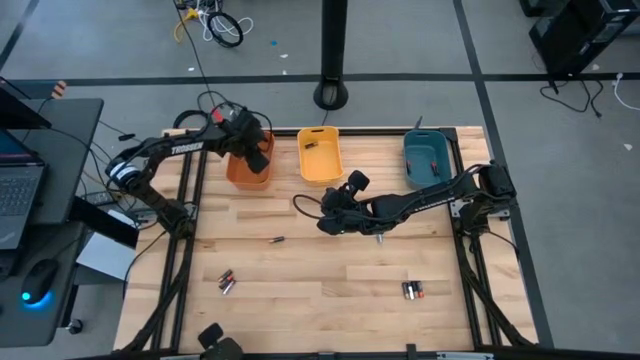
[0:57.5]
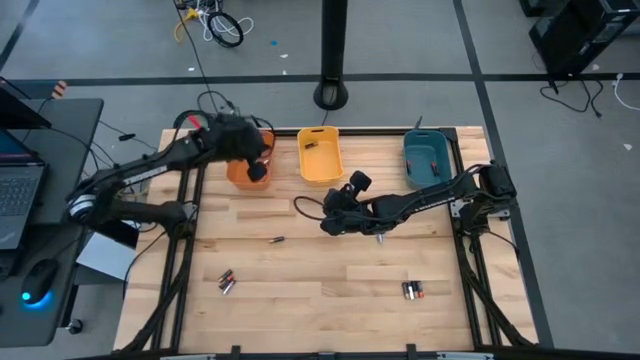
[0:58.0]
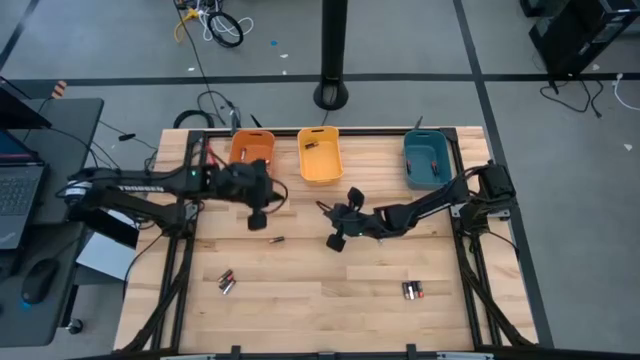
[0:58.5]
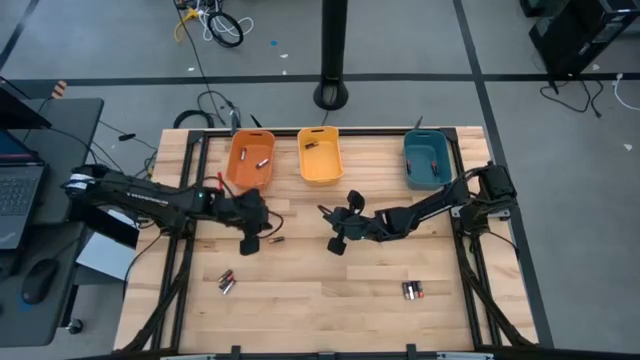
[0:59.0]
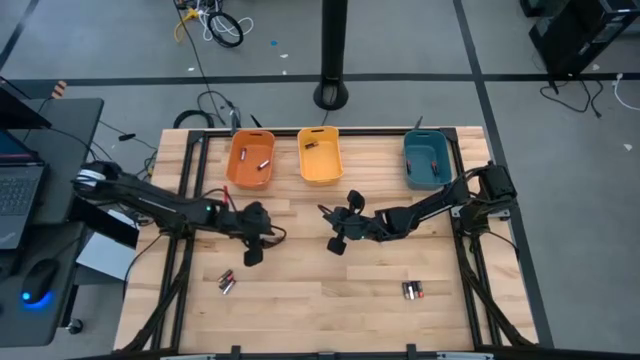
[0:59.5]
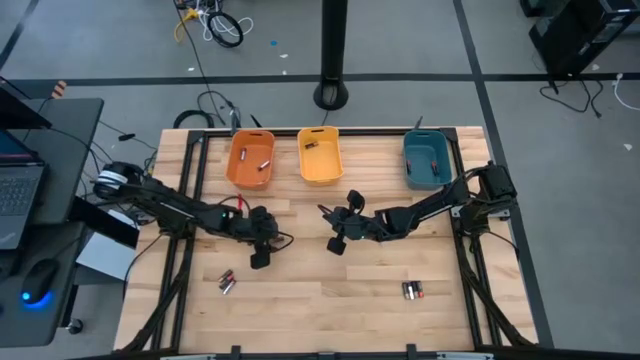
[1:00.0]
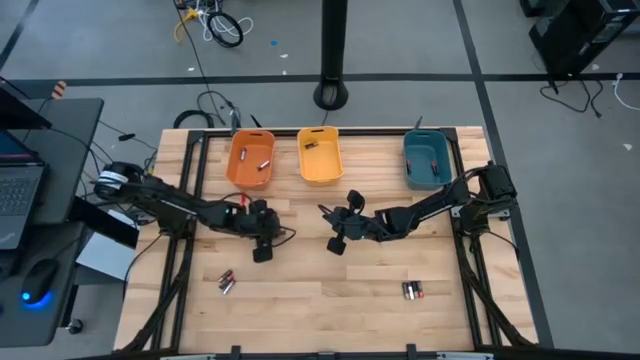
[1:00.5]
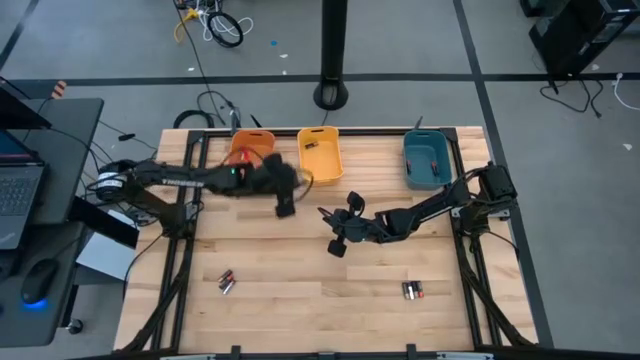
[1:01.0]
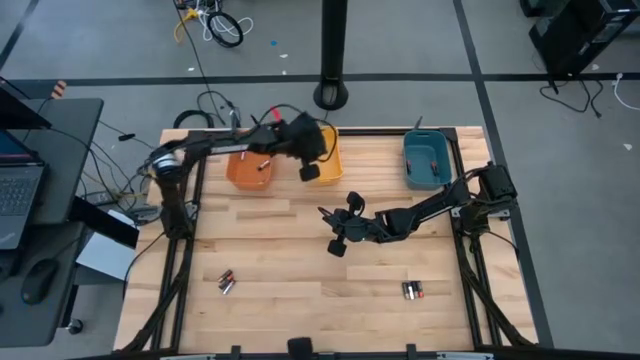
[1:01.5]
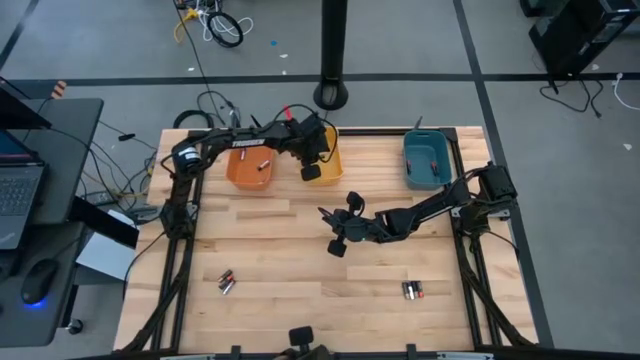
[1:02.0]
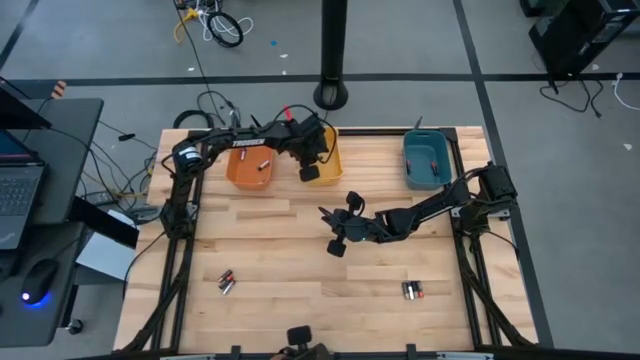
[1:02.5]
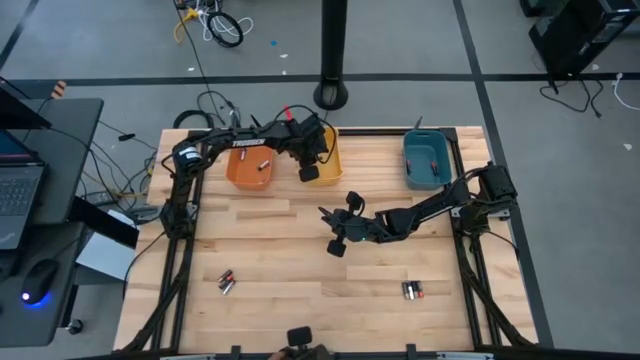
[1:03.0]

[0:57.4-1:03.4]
Task: Sort batteries
Put the black battery into the yellow bin

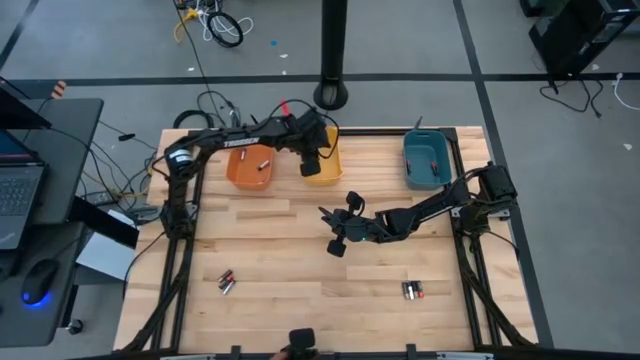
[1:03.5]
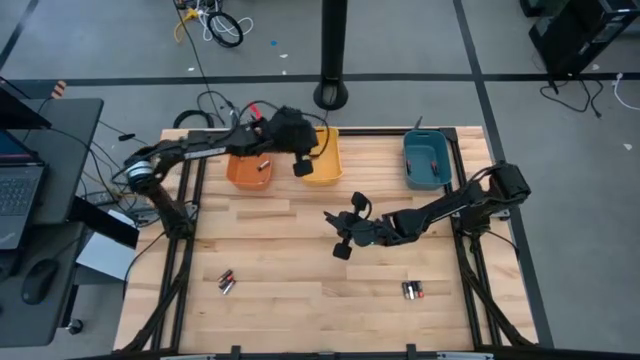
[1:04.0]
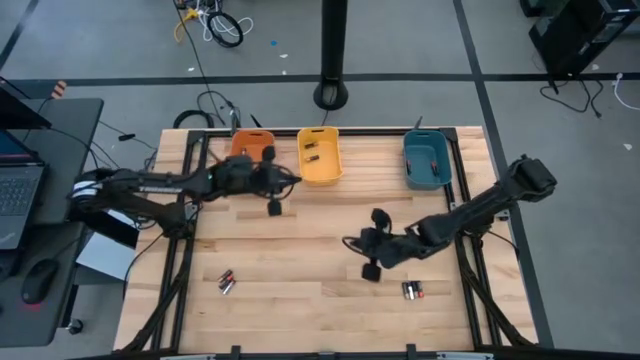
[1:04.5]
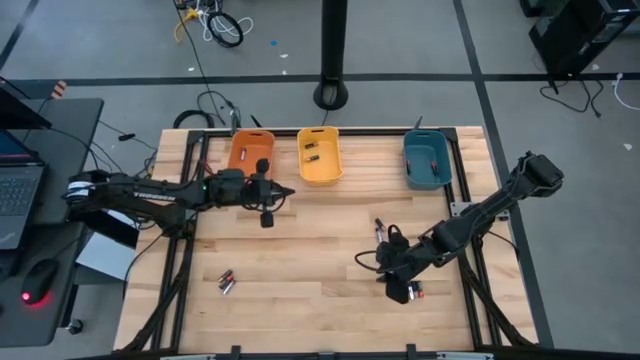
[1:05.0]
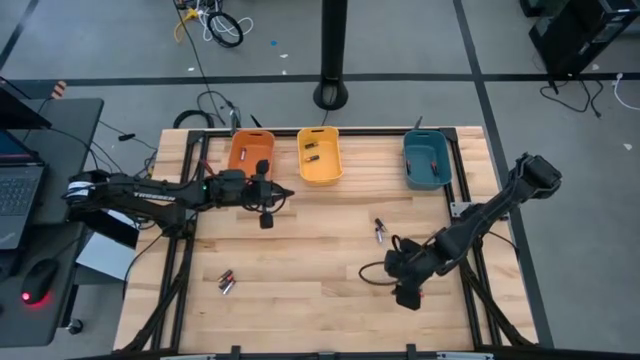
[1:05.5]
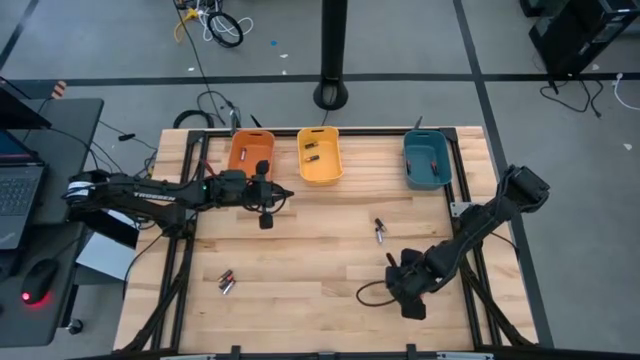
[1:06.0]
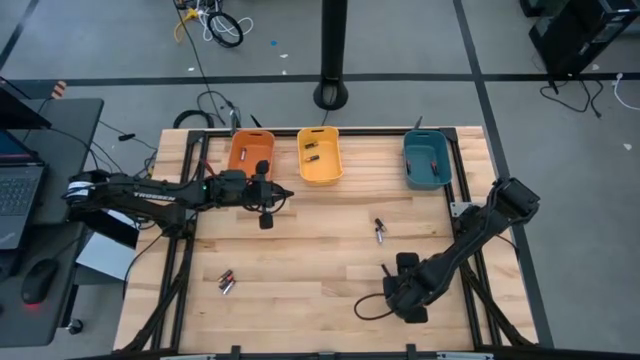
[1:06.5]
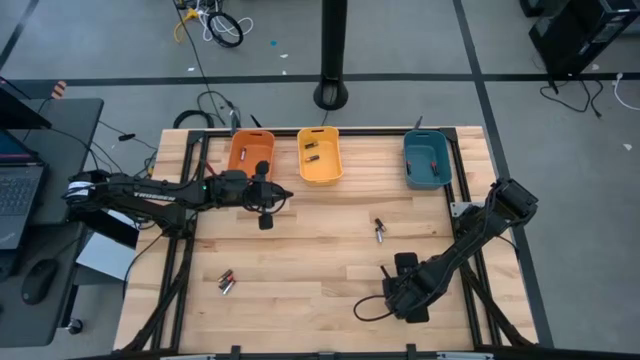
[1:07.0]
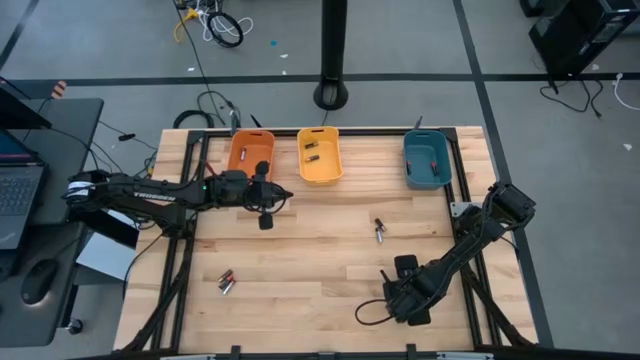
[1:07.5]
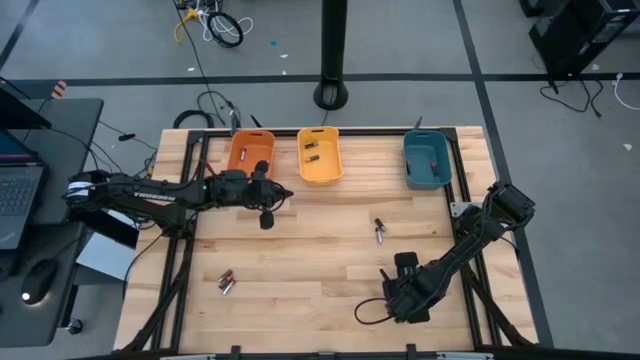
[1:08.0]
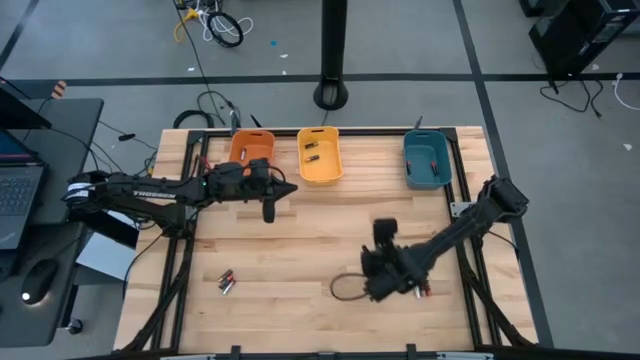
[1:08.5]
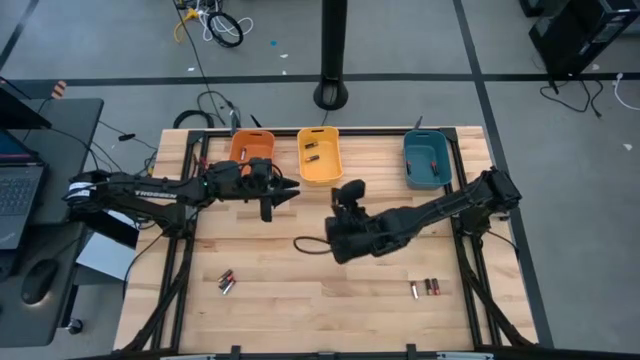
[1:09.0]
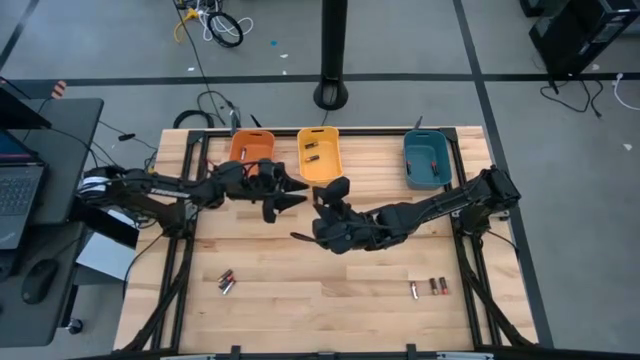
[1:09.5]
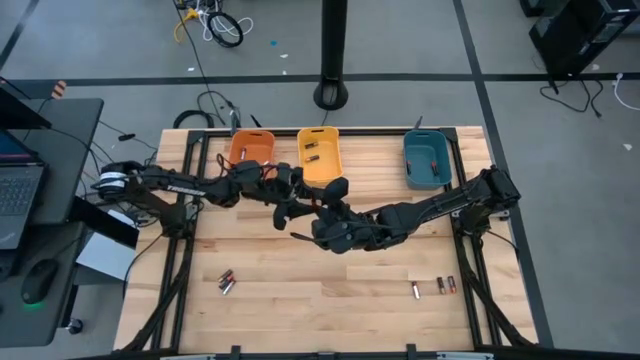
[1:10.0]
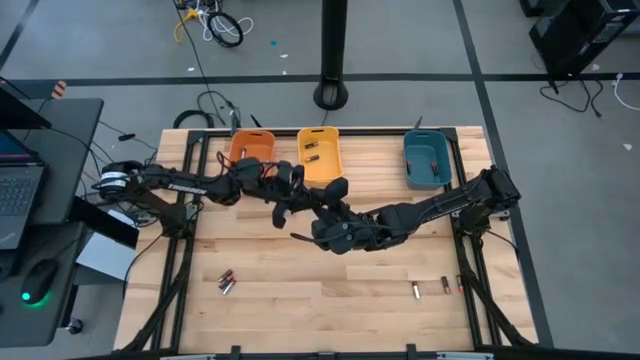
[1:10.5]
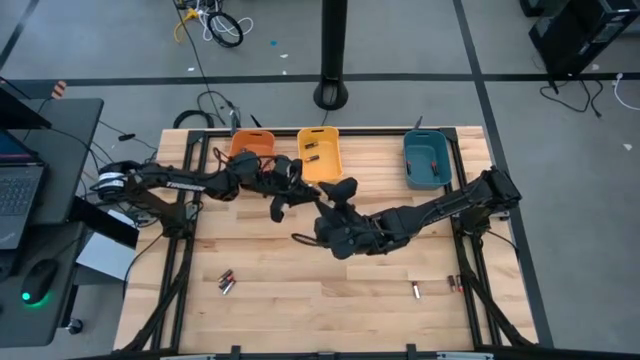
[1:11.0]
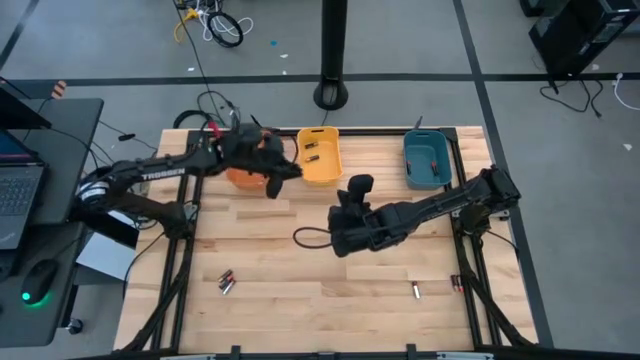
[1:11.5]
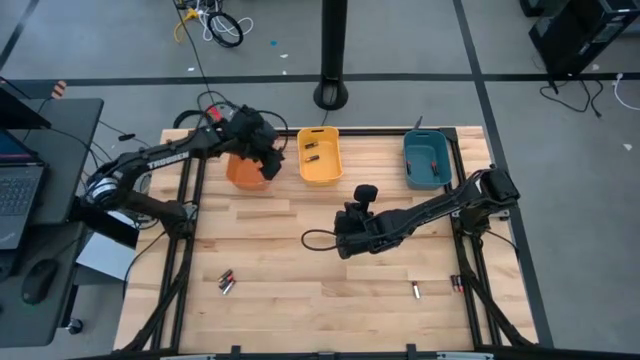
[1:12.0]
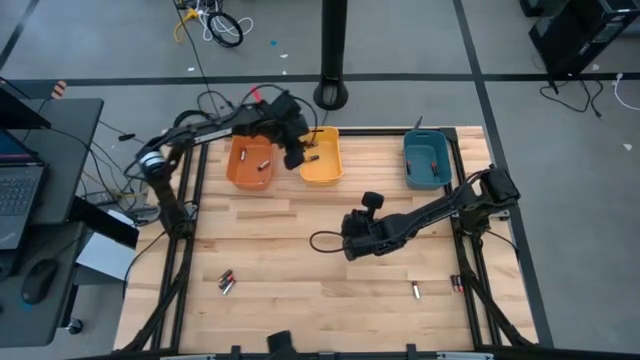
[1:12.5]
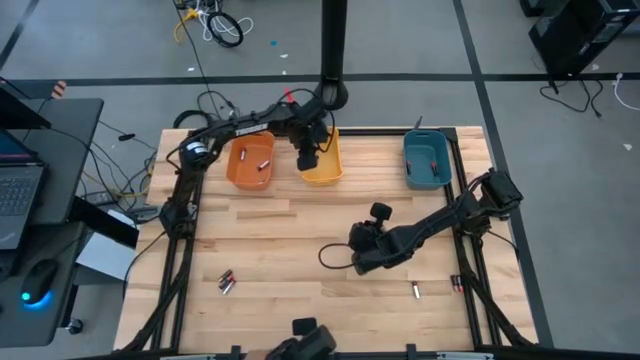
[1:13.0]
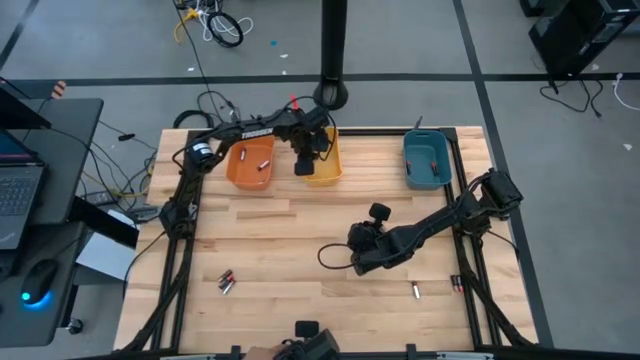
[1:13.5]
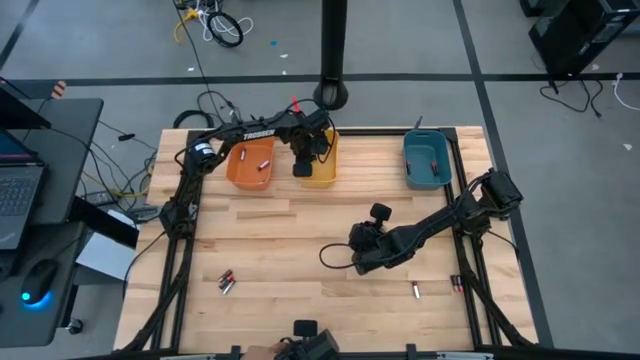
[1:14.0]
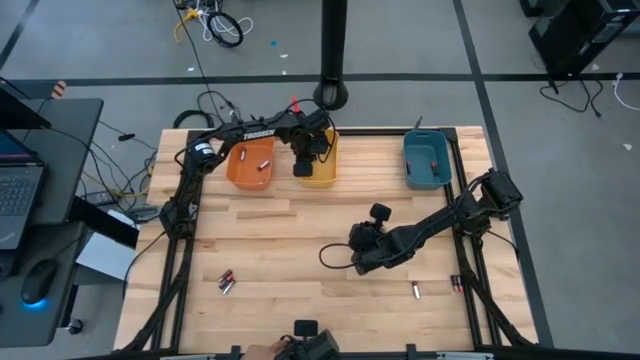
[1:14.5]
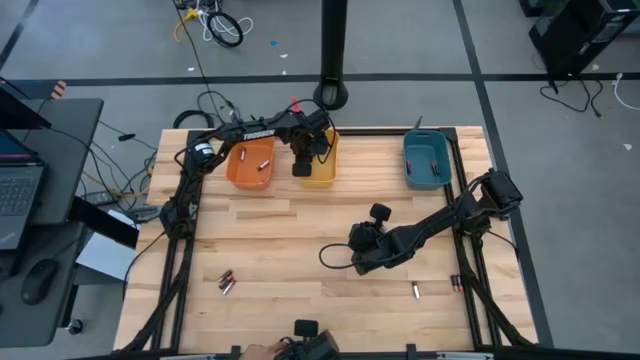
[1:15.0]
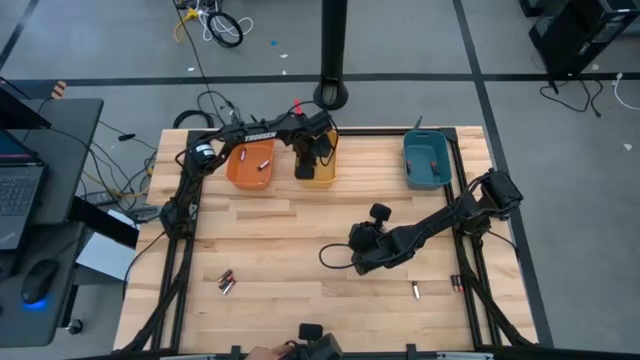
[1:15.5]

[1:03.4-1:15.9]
Put the black battery into the yellow bin

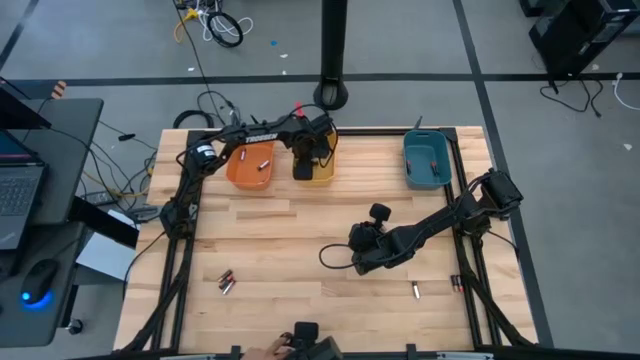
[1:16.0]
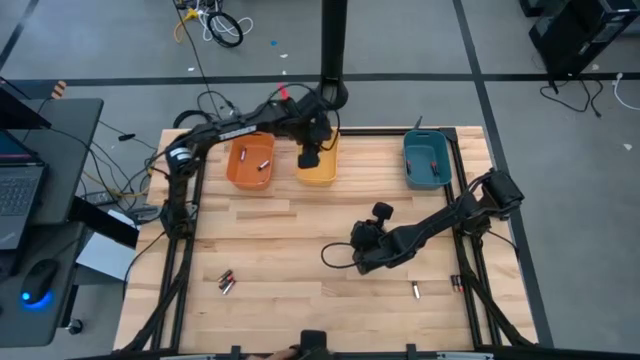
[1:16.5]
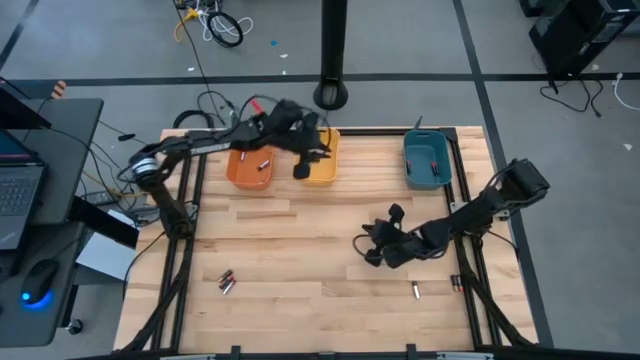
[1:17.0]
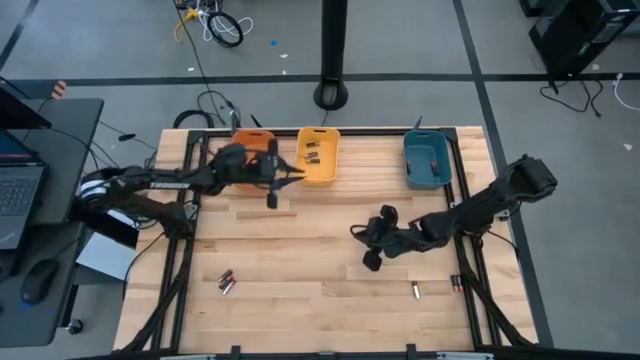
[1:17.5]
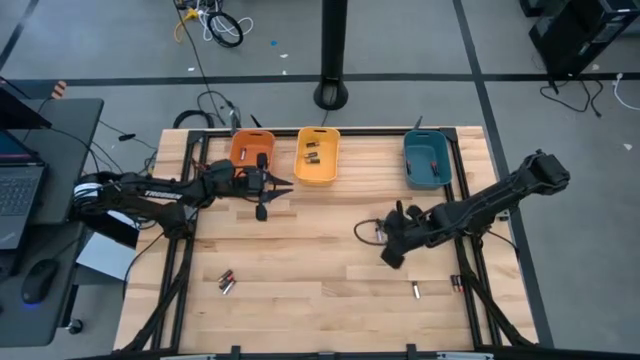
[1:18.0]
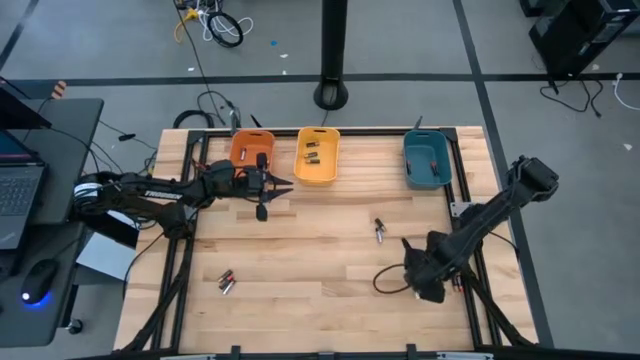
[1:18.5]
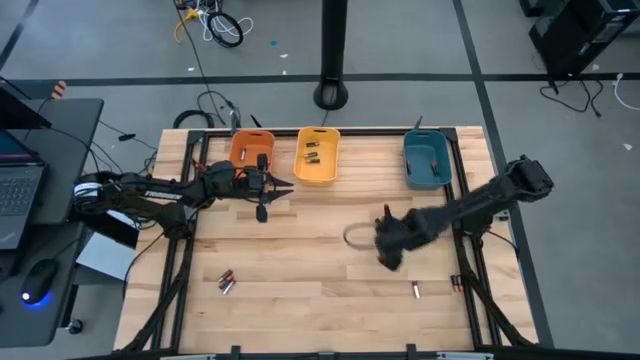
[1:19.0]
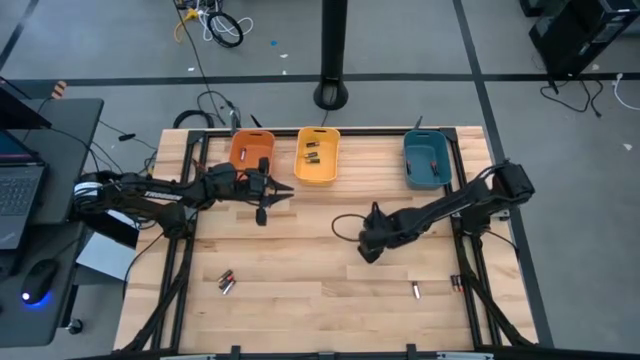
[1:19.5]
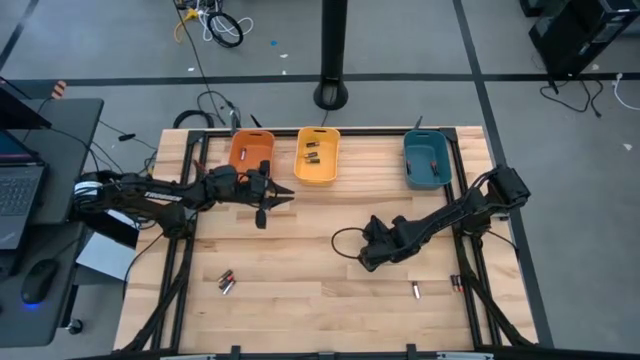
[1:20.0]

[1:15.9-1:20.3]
Put the silver battery into the orange bin
